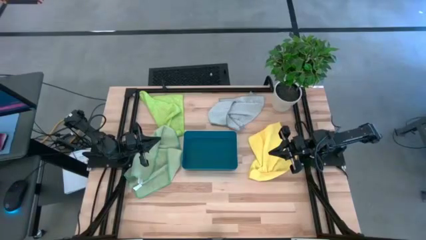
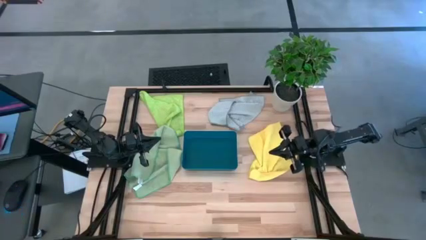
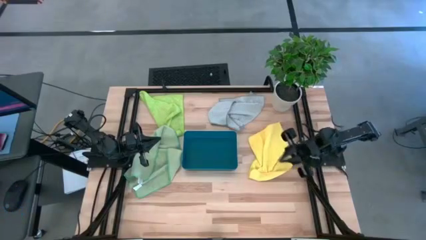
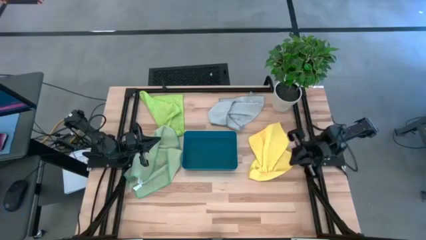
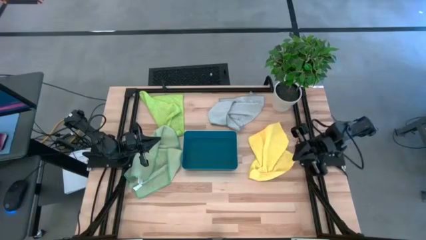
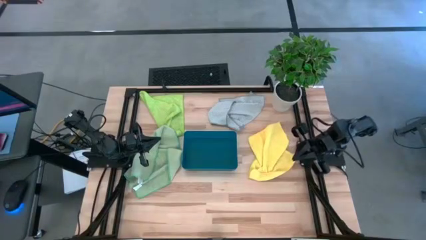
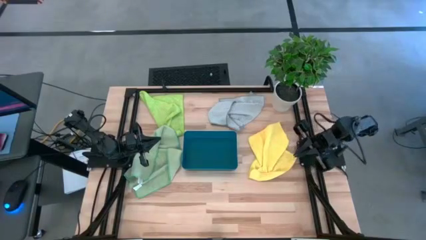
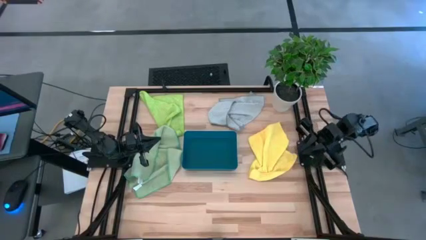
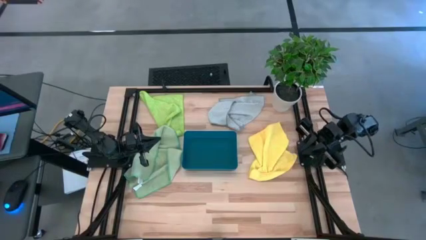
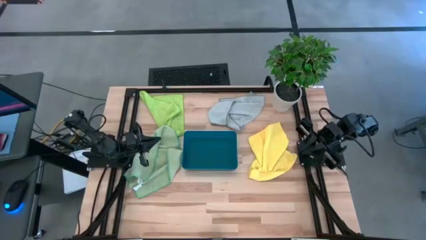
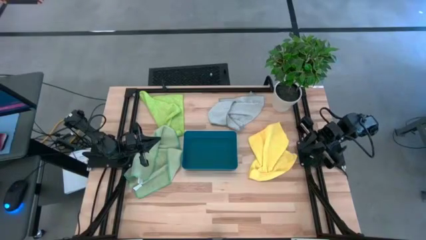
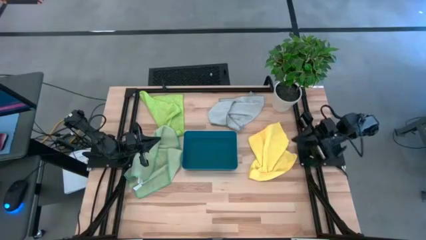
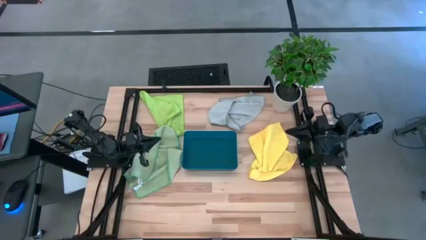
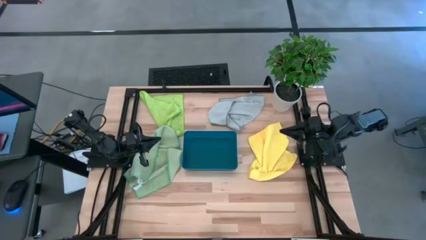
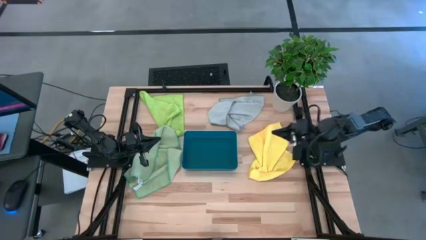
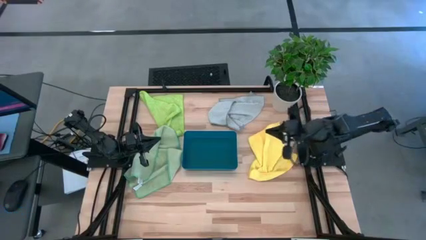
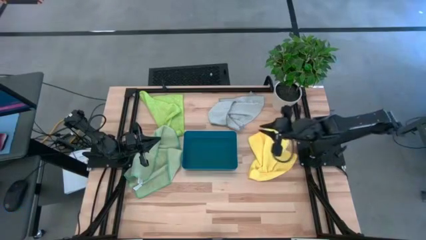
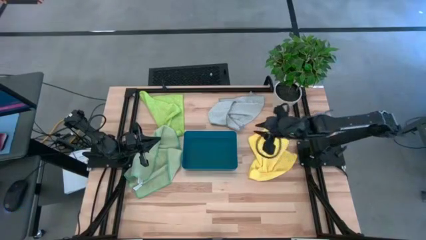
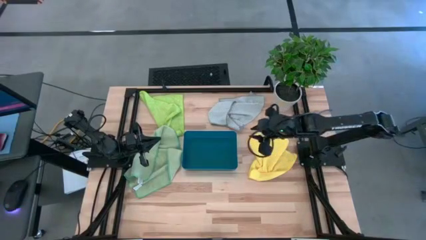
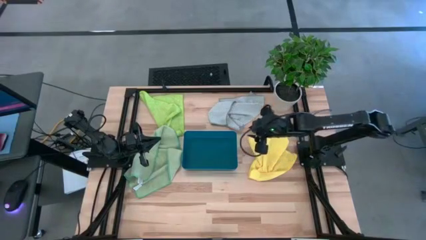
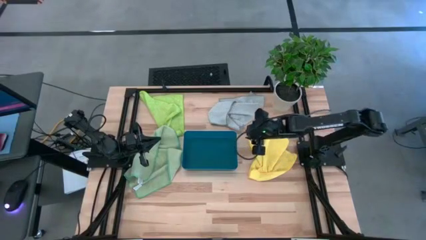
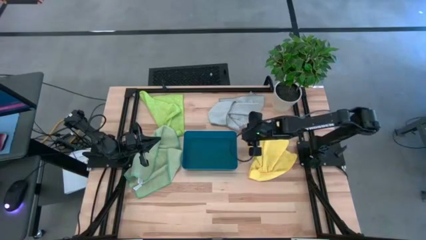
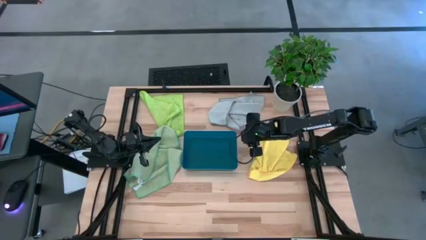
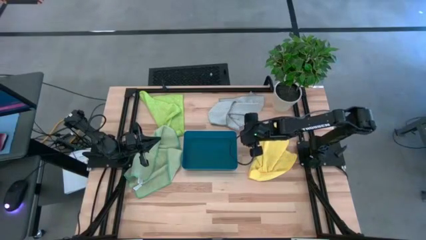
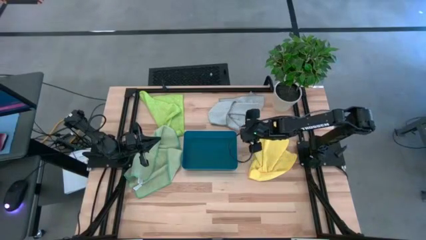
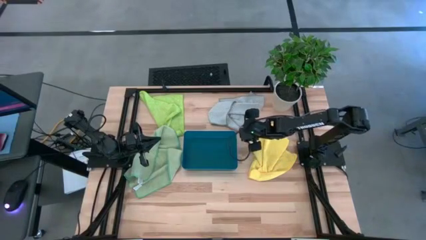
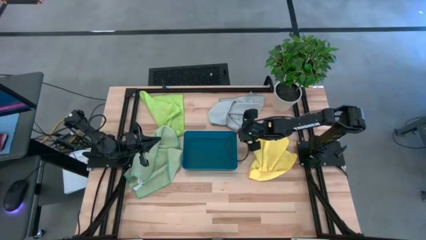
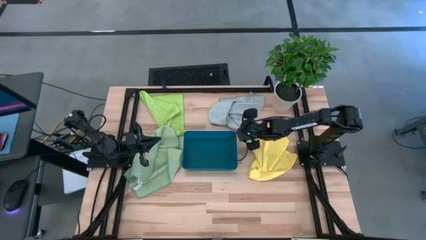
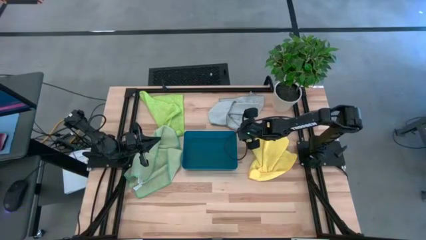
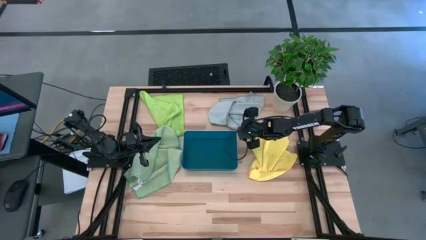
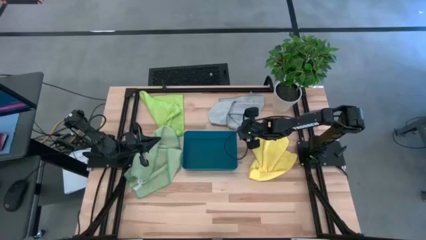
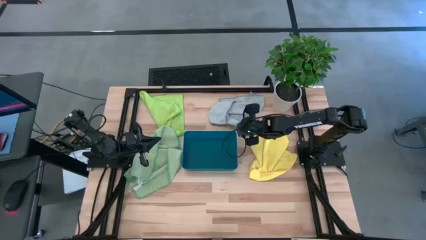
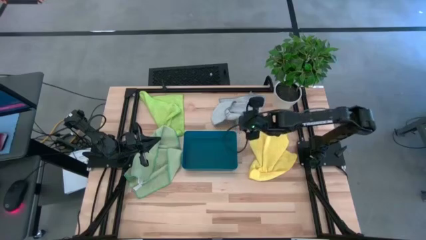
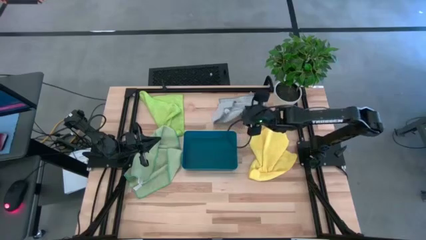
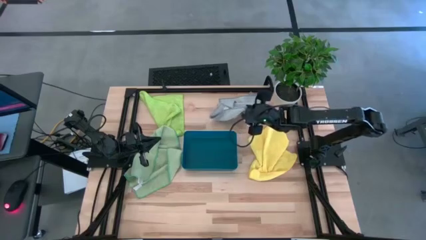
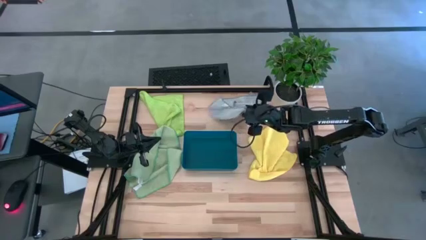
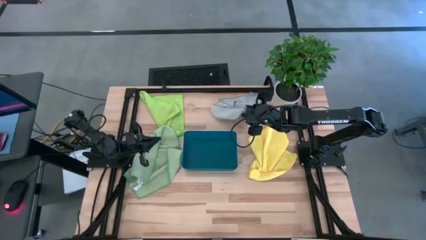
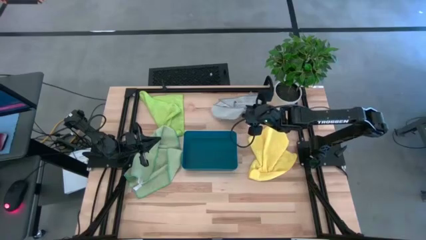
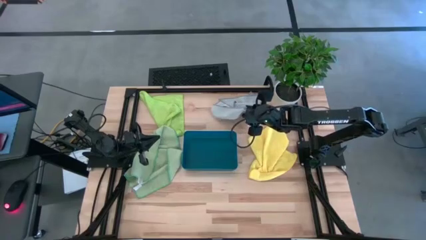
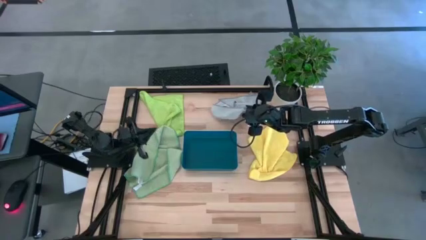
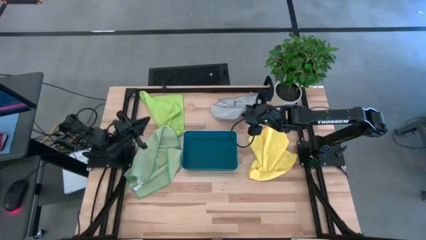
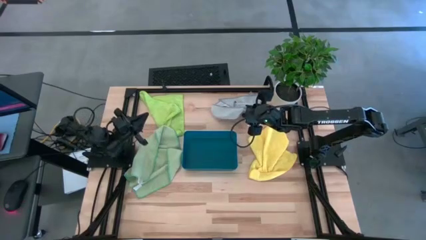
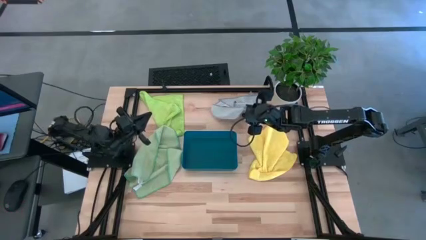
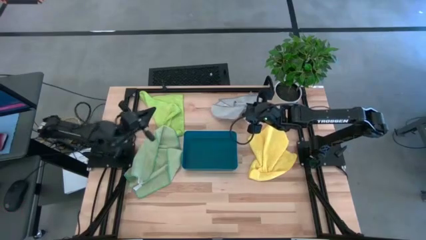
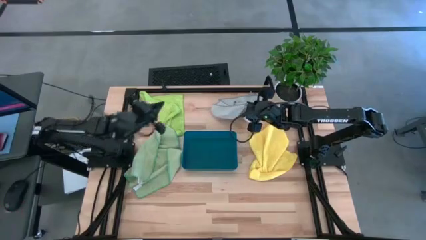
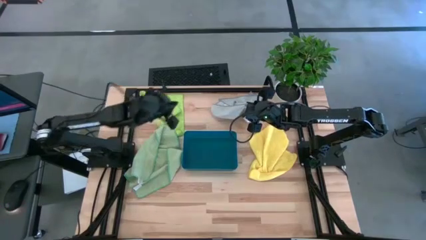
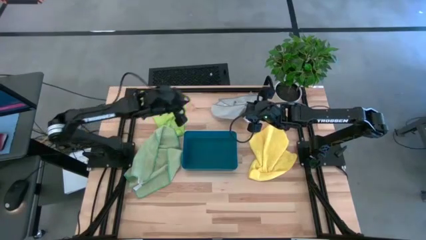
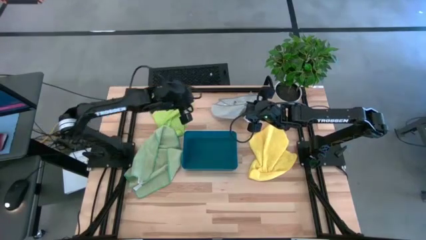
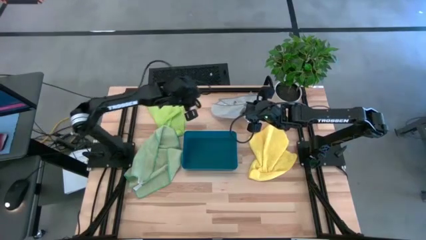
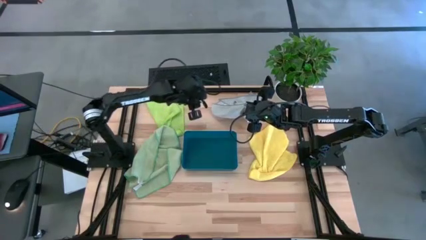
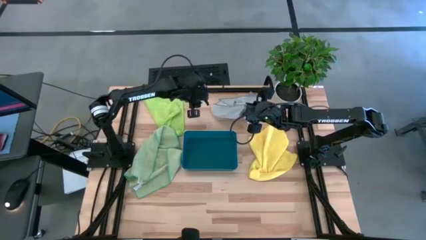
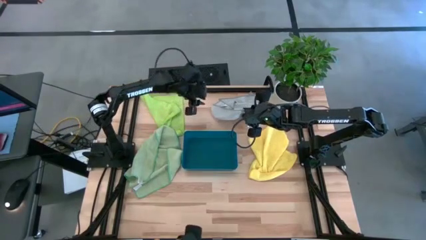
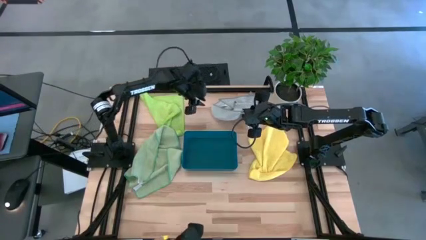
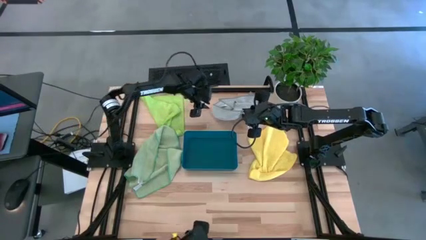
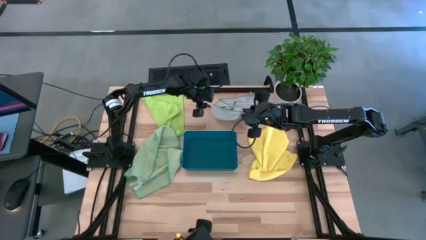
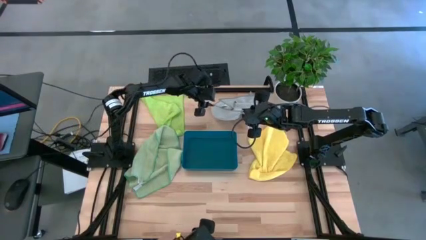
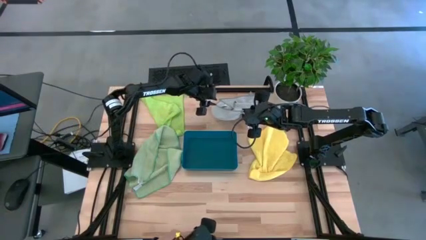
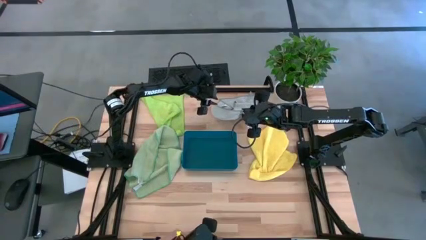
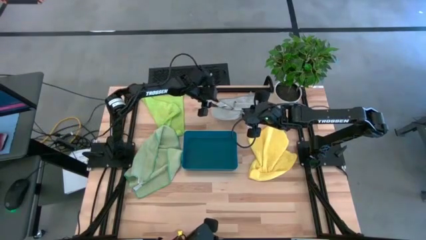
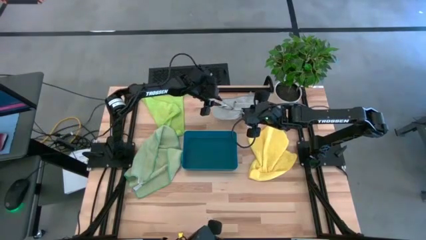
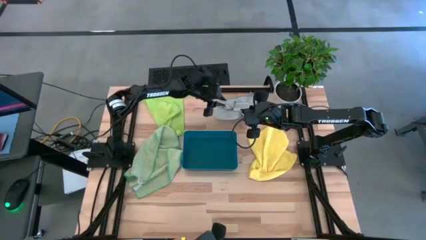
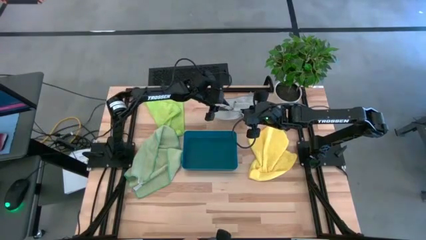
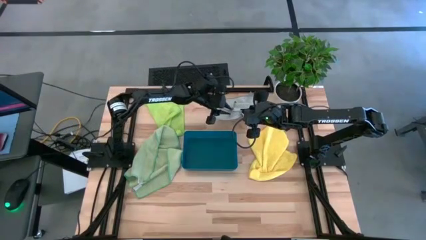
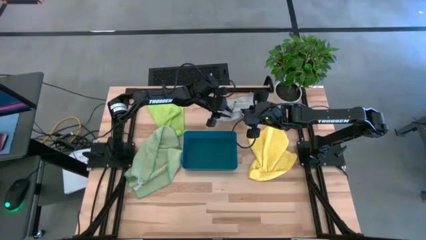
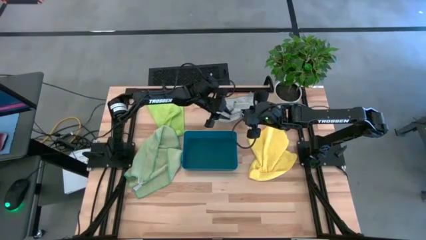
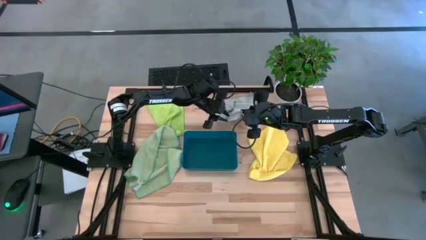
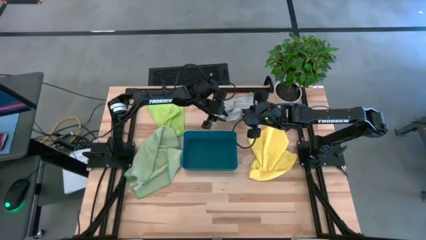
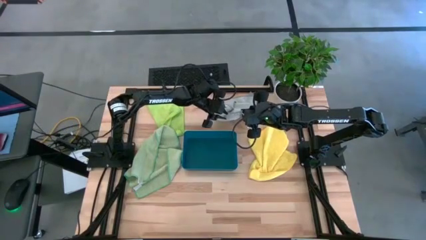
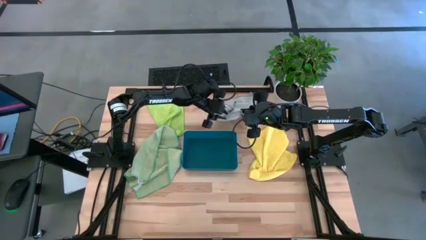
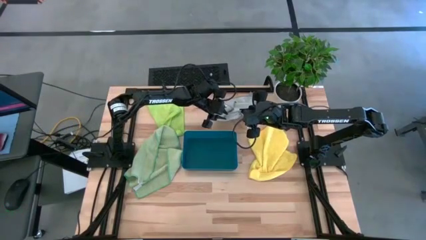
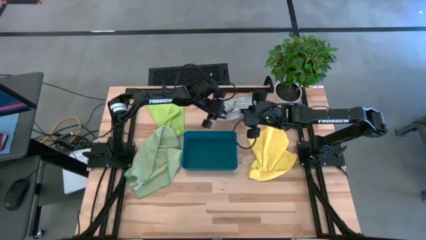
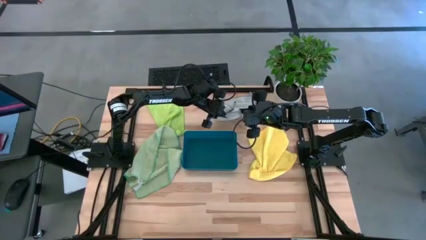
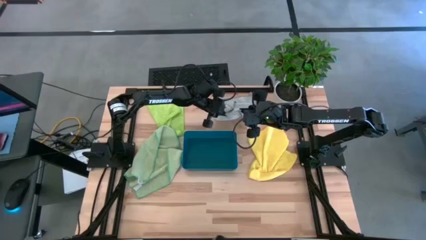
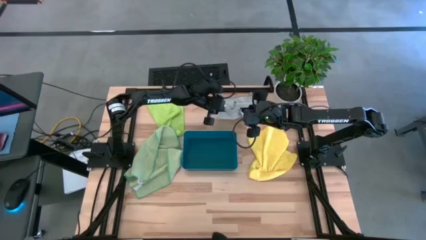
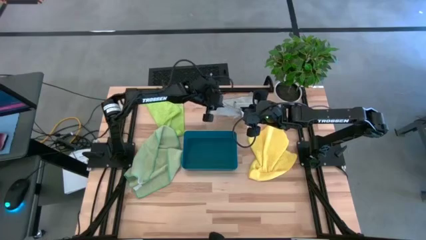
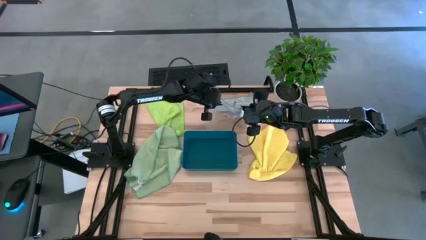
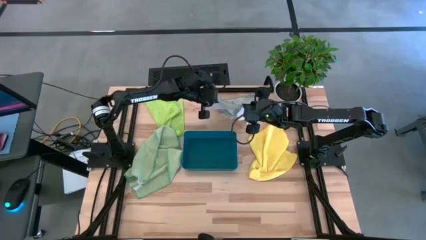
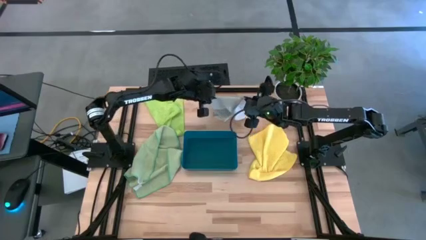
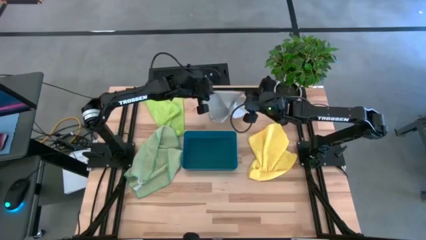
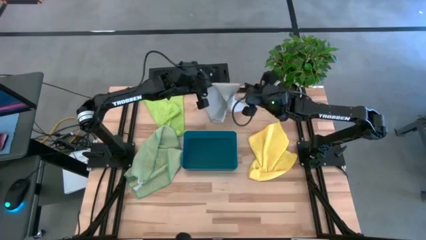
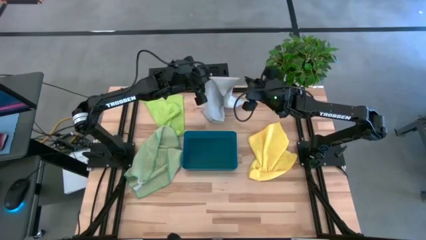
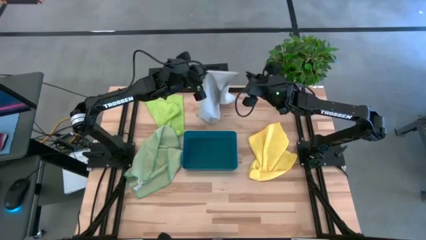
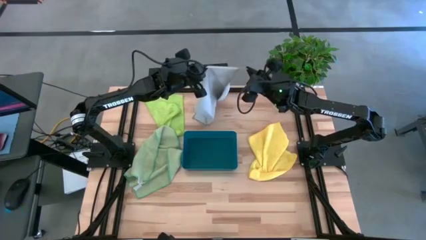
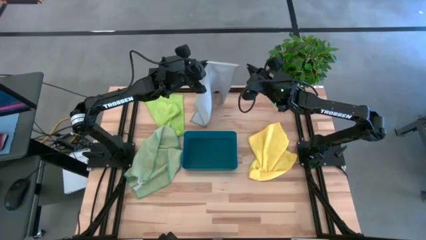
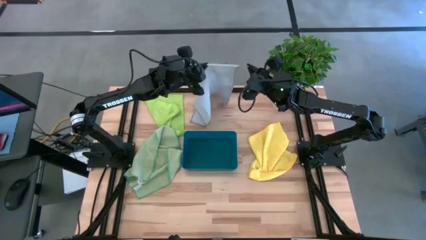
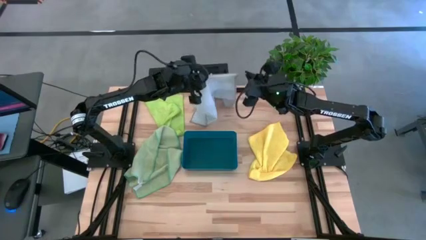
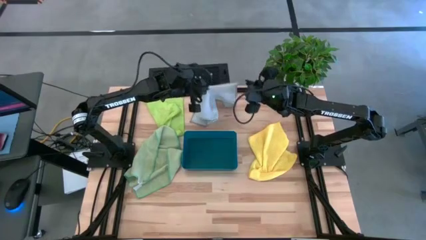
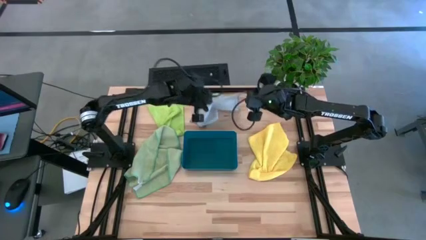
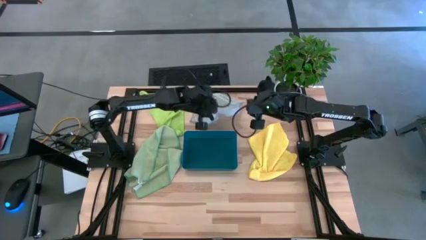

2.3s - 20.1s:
Task: Fold microfiber towels
Fold the gray microfiber towel
